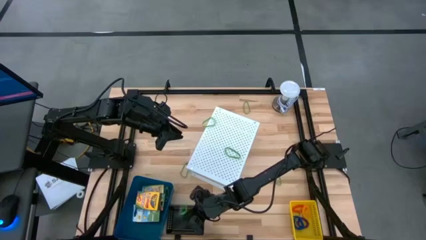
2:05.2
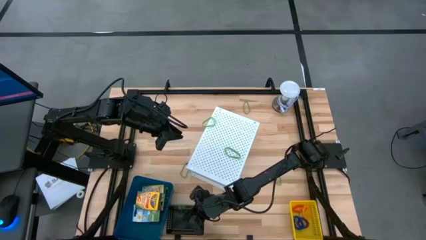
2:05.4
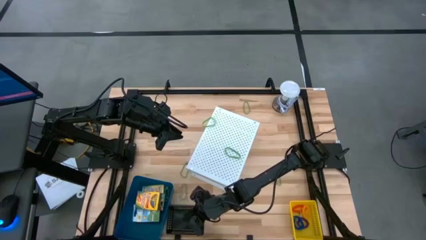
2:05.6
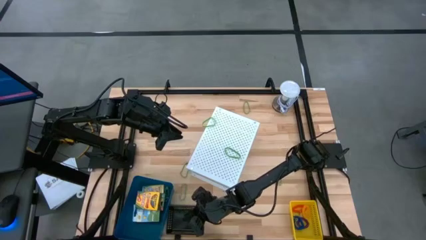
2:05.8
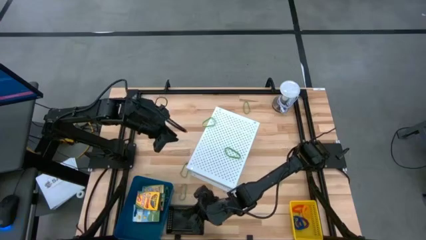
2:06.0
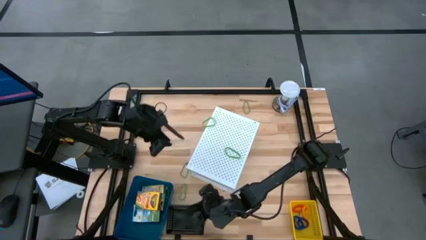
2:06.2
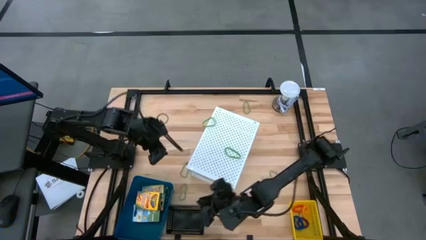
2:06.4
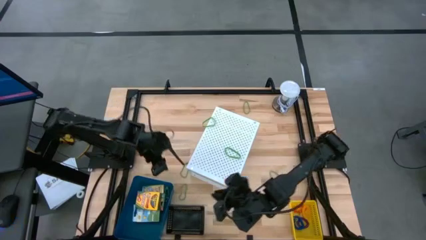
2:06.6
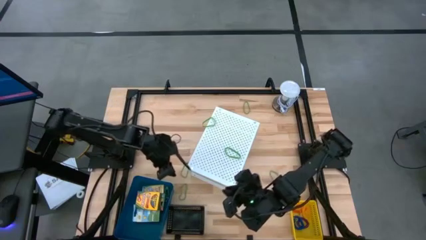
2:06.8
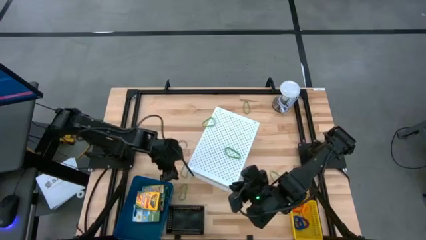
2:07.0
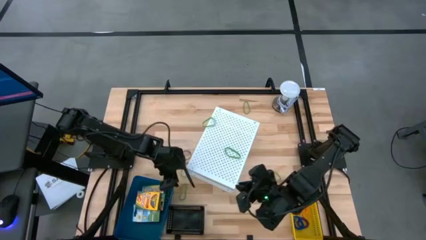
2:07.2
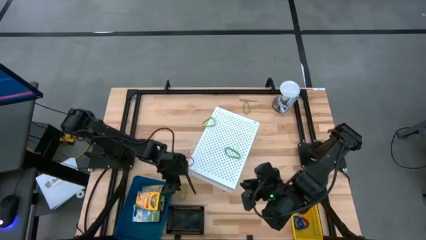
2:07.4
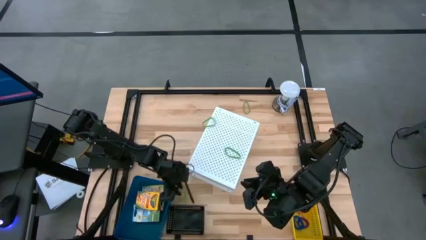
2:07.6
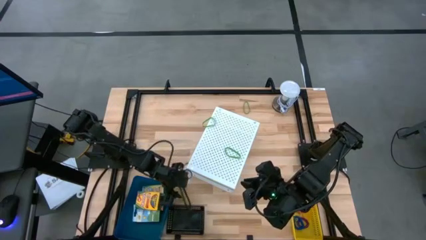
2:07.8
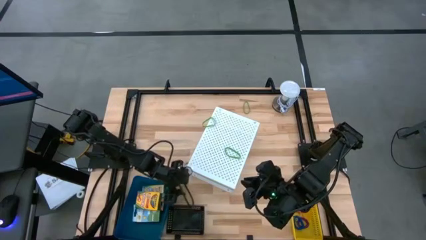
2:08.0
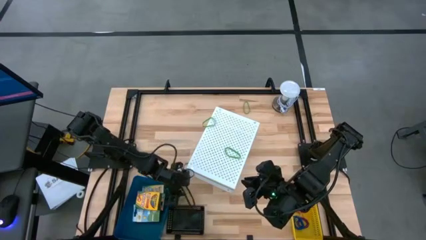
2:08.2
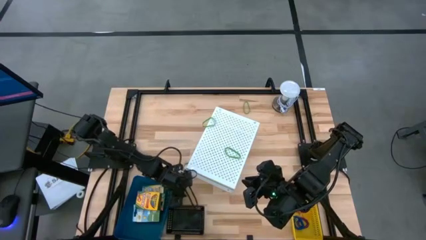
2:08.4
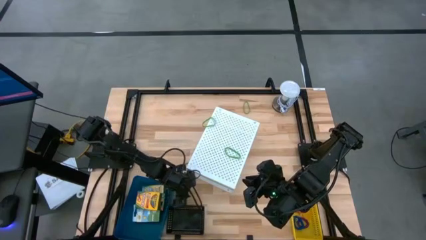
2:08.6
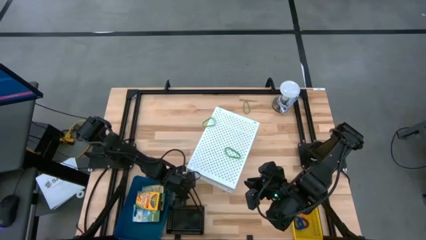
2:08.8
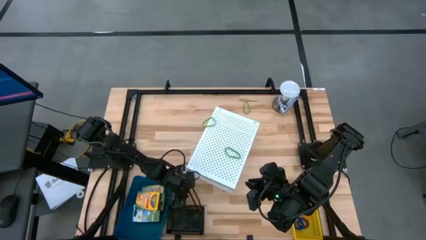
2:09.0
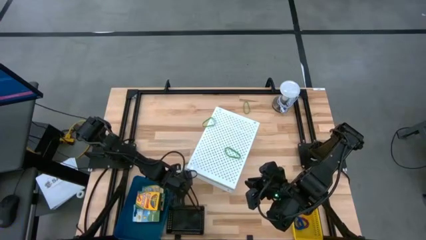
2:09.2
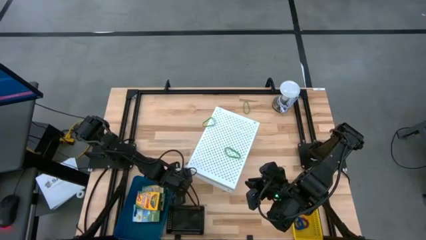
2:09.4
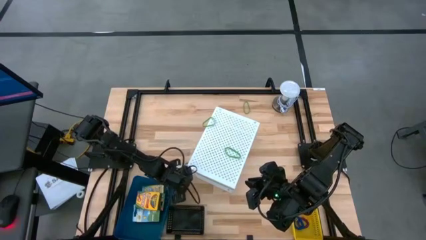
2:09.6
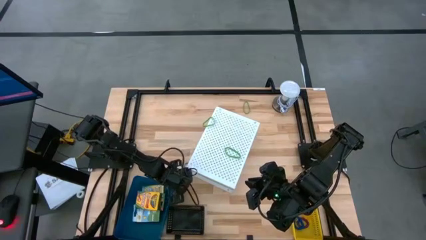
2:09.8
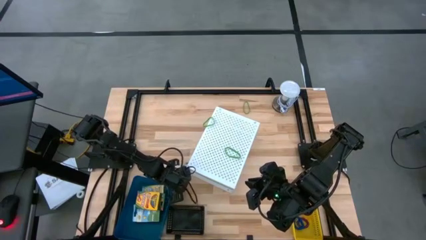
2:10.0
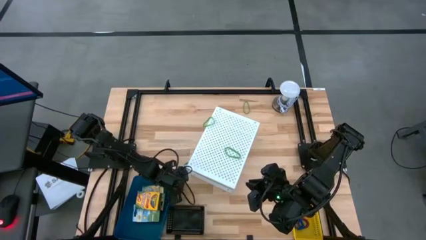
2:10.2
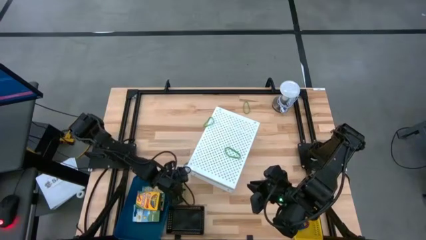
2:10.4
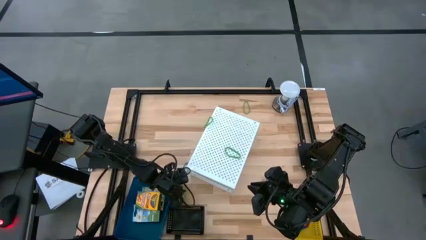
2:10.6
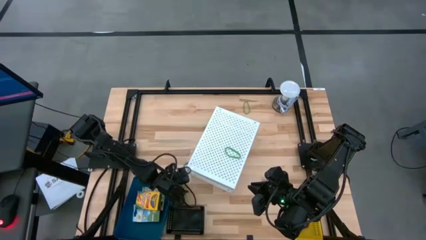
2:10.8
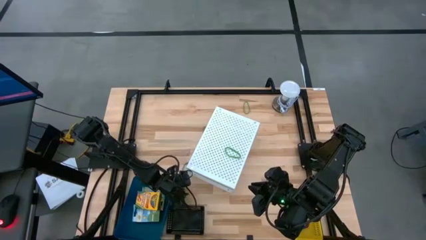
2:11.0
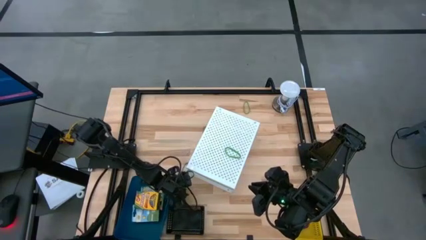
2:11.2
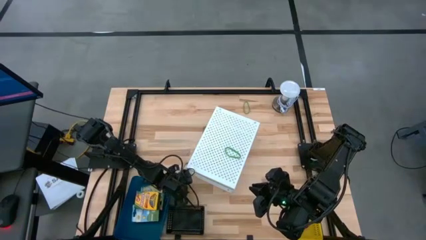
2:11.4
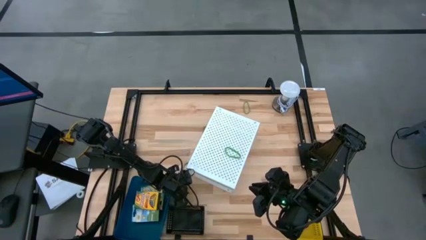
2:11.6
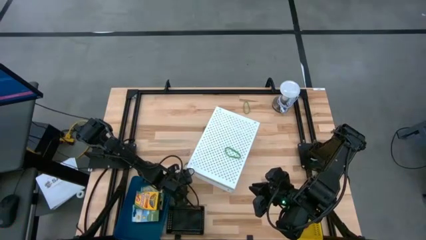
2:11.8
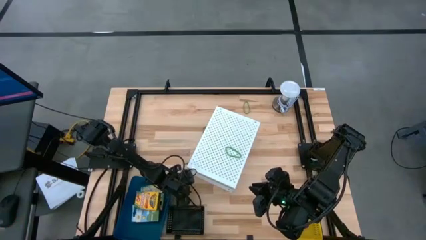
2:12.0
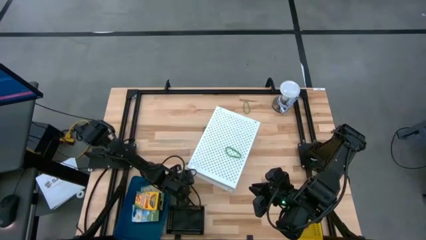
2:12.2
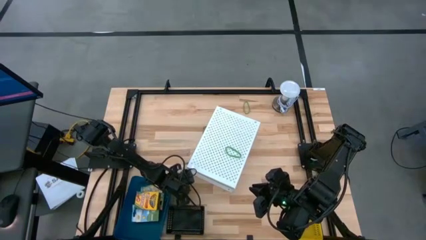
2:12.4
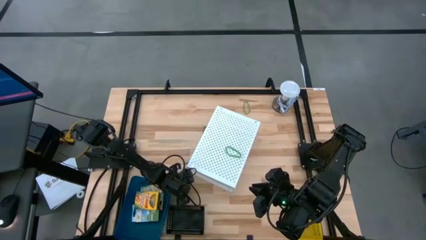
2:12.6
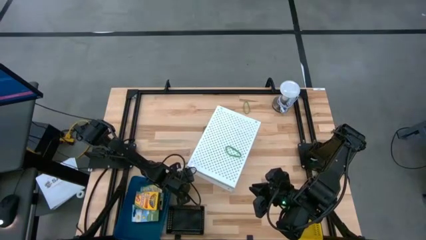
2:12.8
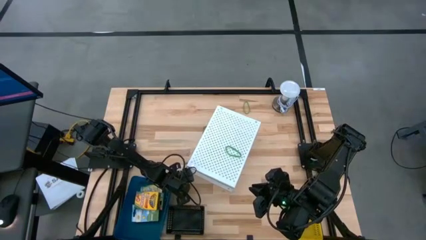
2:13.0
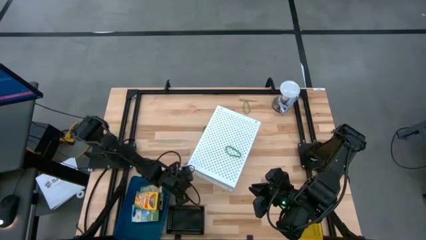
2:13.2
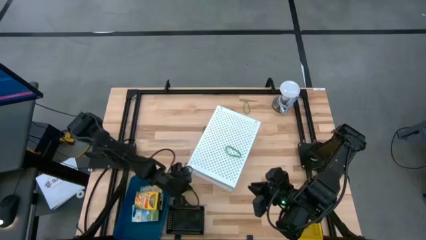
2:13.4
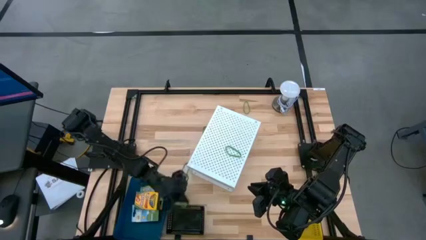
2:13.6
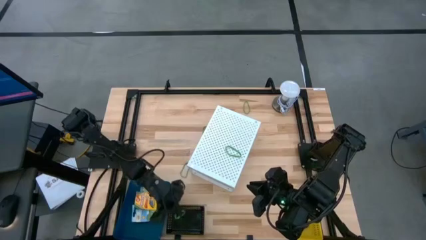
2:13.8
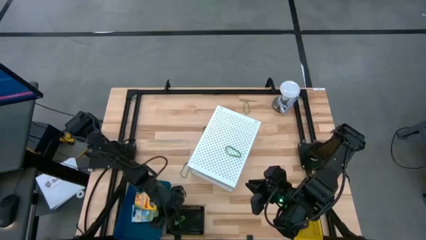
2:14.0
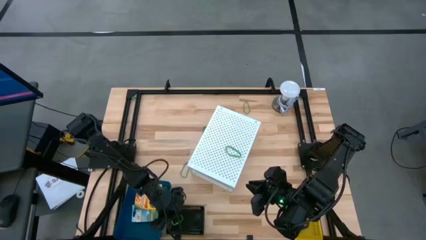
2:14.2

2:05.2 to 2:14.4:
Task: Pick & Place Office Desk Supplies
Put the green rubber band into the black bin

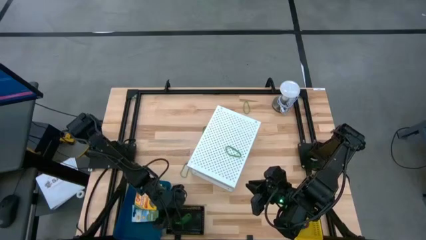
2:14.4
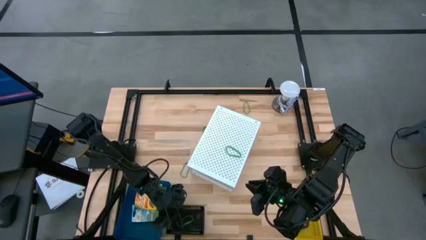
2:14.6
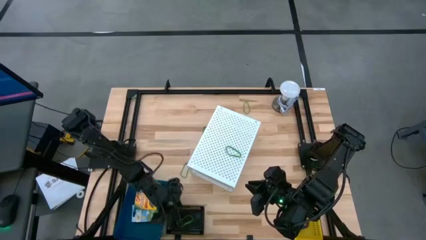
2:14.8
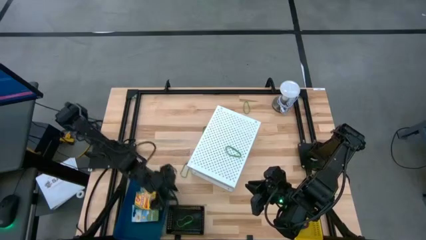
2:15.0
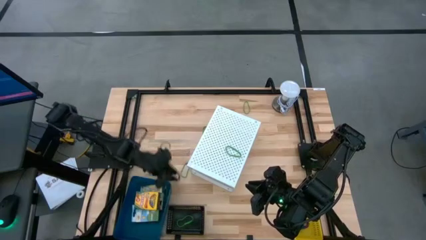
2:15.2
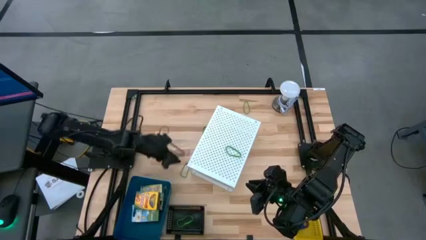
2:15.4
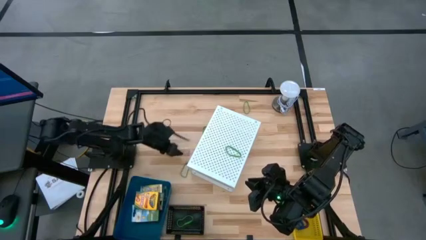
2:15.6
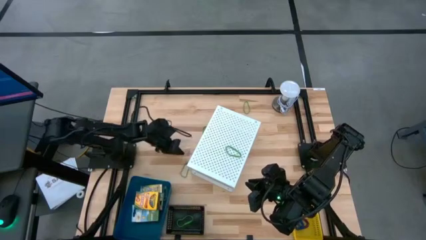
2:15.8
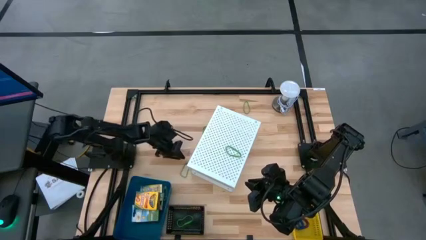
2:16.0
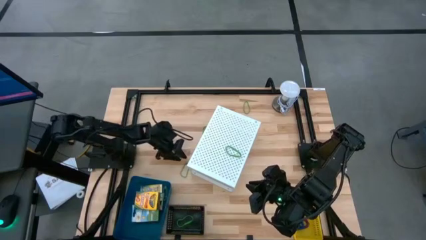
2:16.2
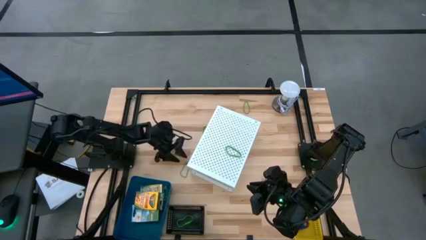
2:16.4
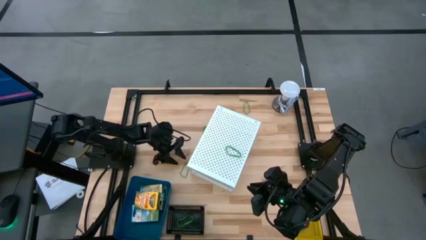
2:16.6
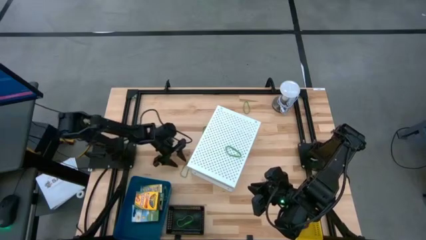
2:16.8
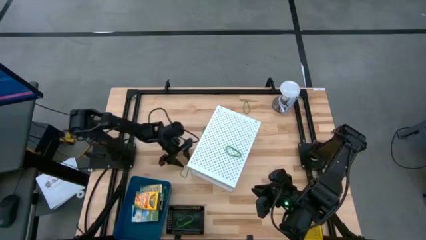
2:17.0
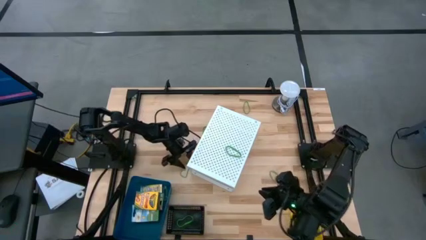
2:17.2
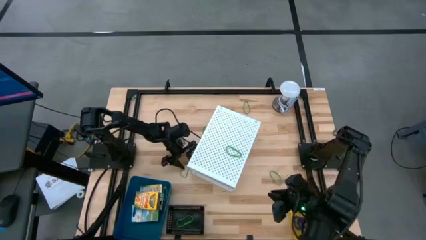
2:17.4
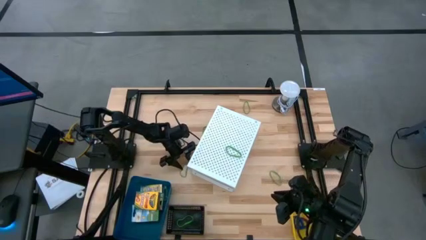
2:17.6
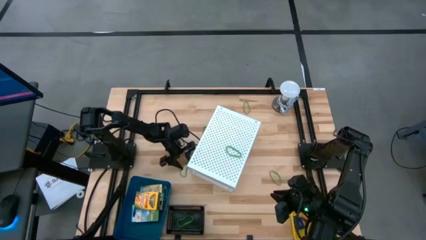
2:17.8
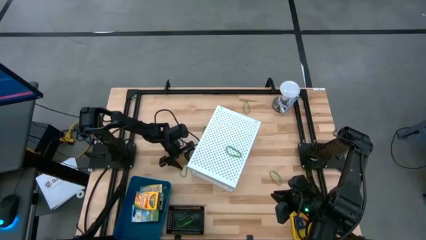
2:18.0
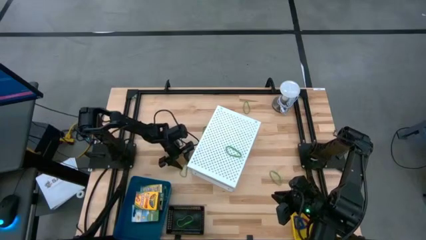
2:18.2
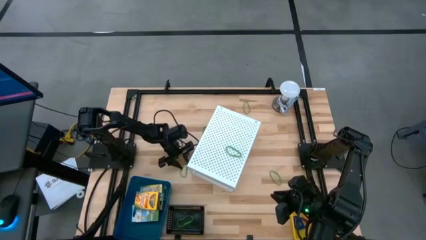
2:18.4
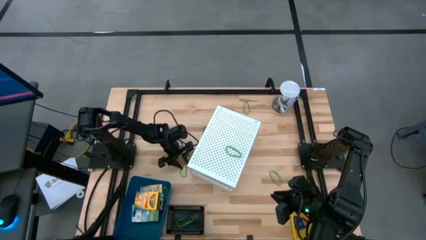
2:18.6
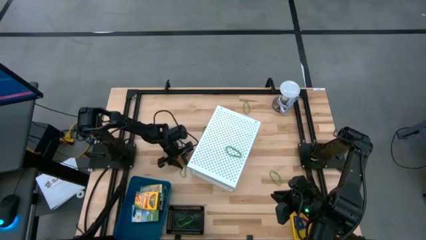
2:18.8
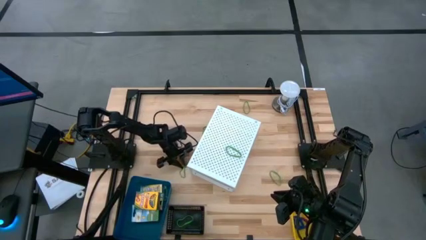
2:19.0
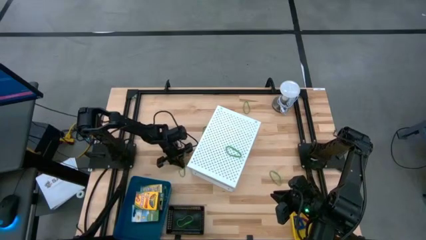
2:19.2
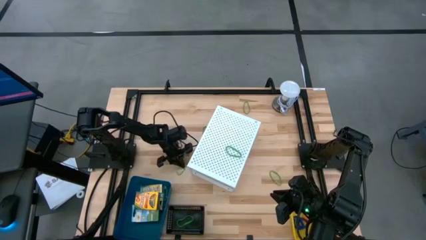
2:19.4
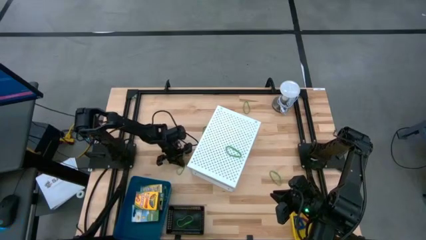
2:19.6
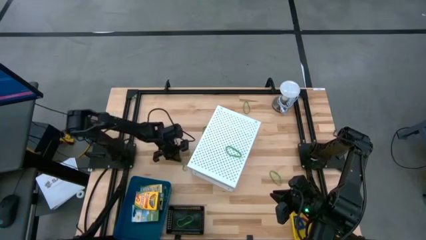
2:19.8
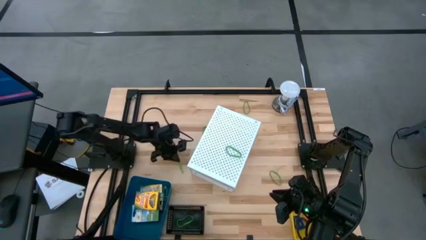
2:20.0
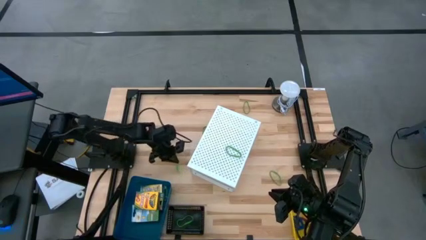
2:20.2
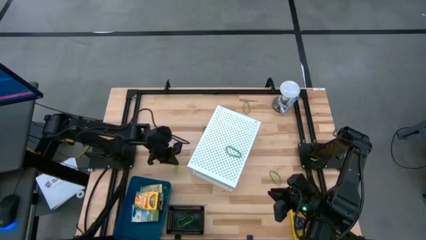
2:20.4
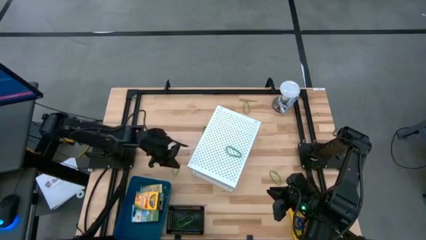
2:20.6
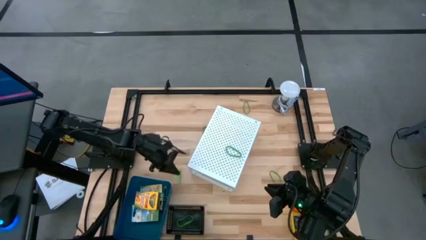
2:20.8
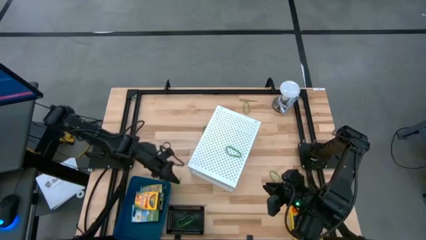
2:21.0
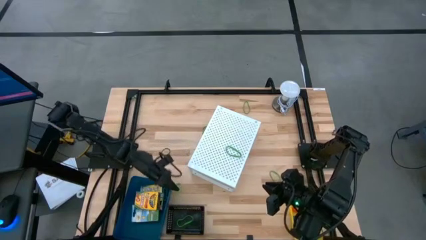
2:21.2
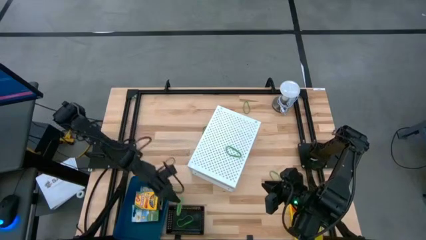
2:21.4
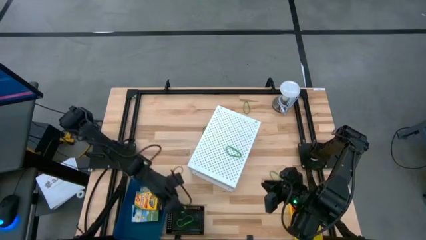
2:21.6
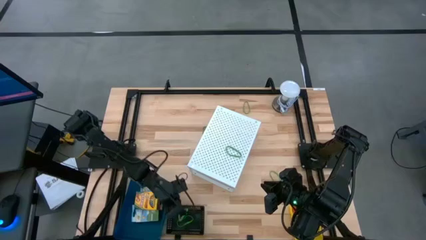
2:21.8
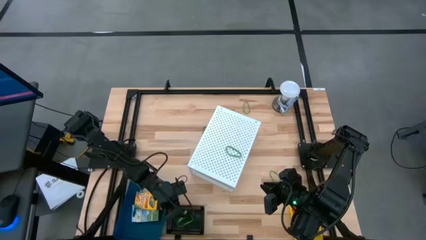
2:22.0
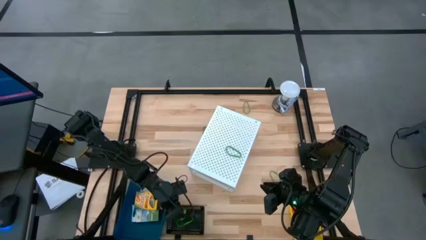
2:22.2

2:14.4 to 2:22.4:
Put the green rubber band into the black bin
